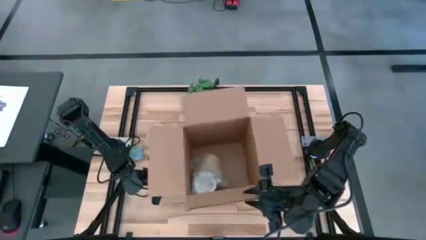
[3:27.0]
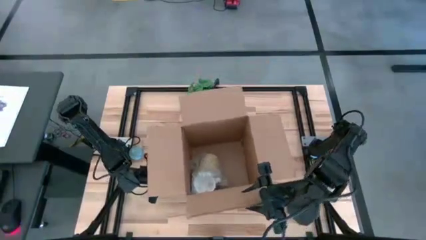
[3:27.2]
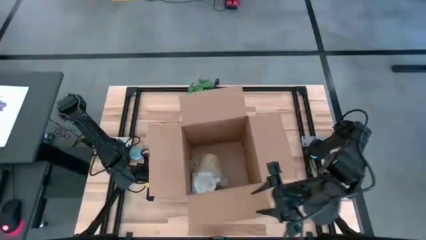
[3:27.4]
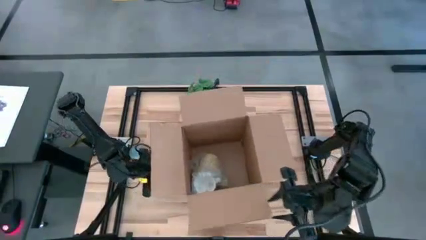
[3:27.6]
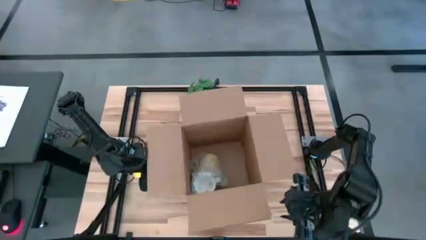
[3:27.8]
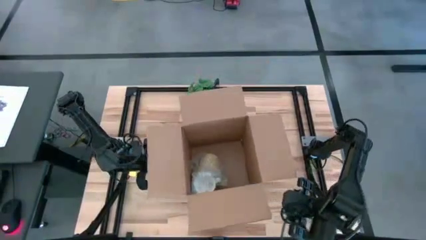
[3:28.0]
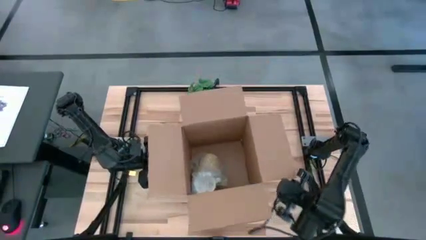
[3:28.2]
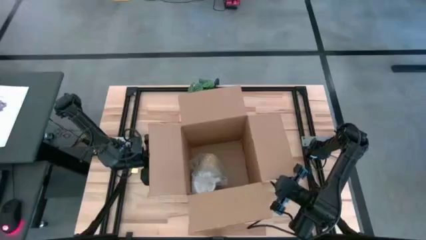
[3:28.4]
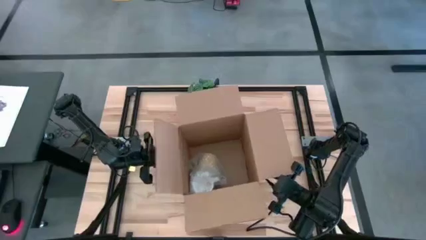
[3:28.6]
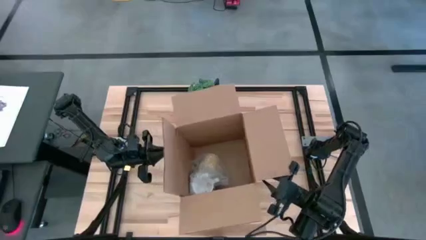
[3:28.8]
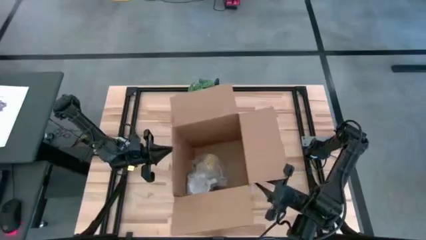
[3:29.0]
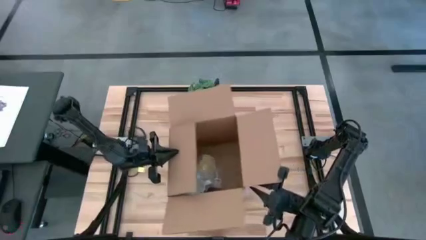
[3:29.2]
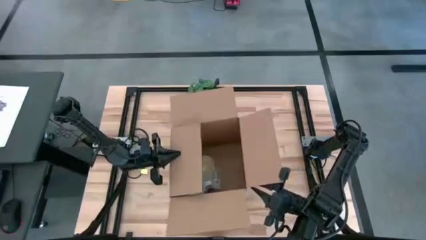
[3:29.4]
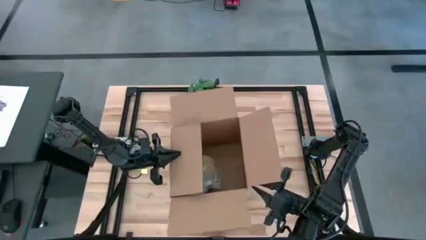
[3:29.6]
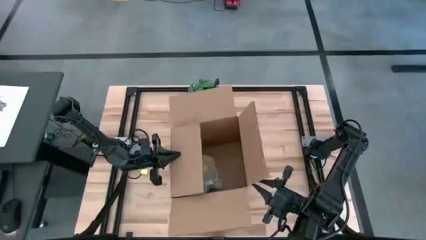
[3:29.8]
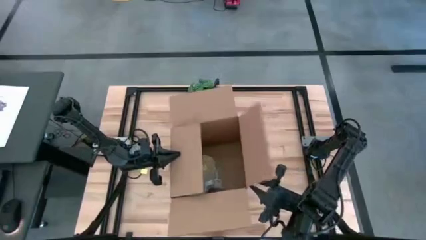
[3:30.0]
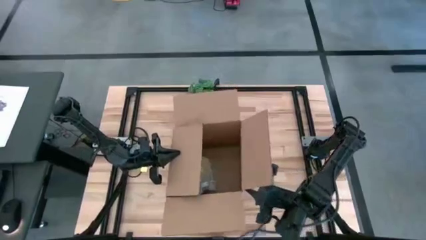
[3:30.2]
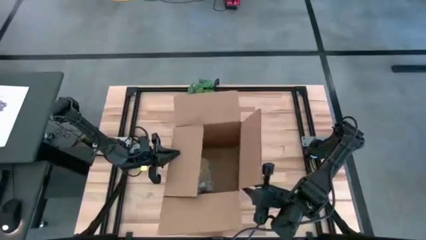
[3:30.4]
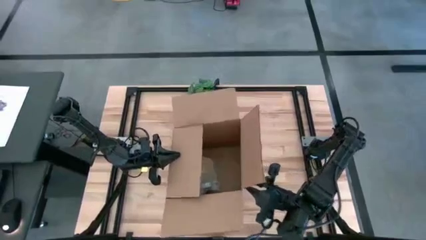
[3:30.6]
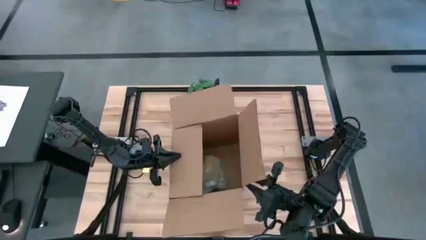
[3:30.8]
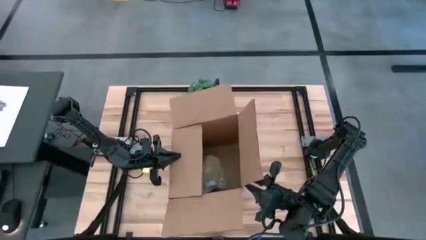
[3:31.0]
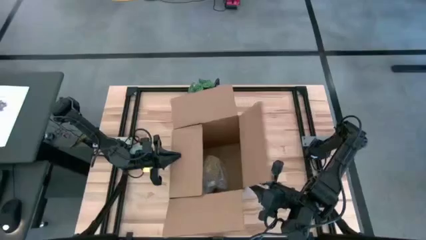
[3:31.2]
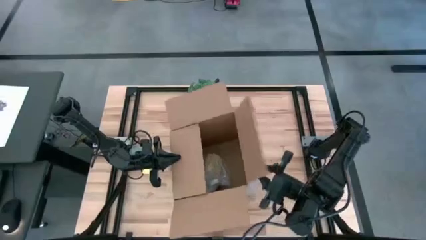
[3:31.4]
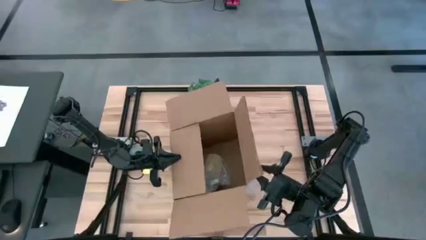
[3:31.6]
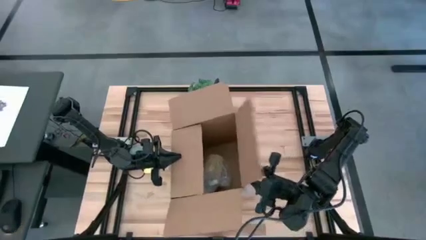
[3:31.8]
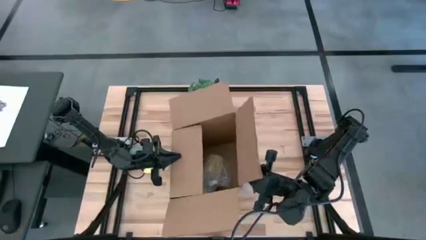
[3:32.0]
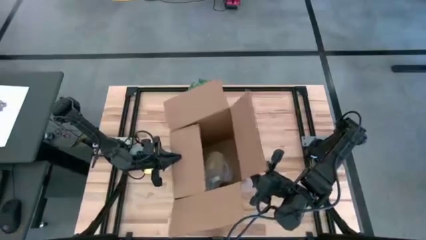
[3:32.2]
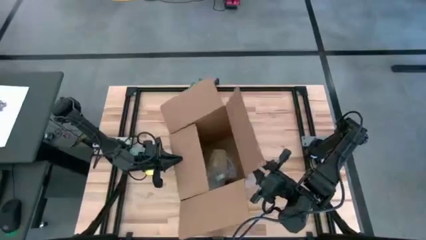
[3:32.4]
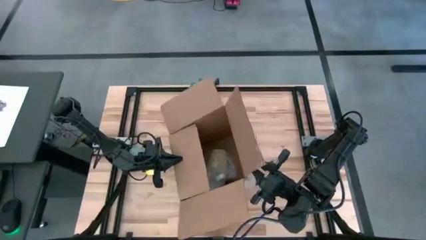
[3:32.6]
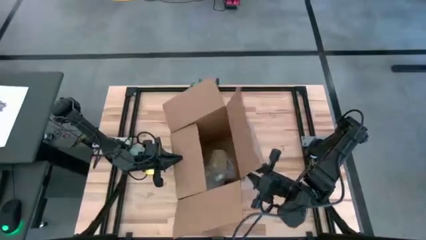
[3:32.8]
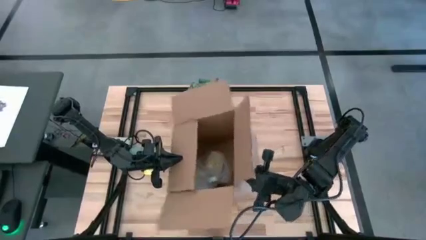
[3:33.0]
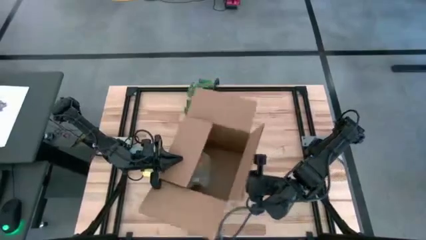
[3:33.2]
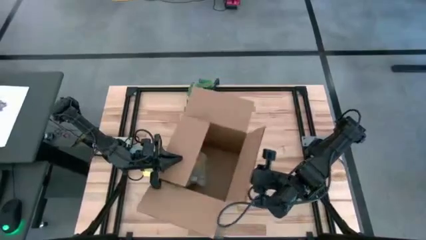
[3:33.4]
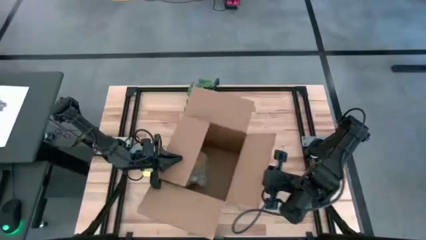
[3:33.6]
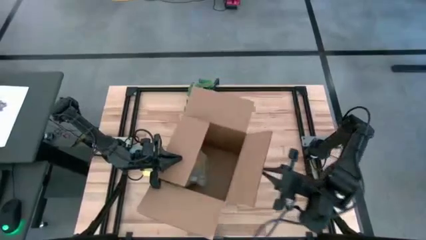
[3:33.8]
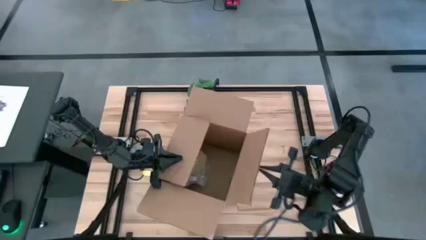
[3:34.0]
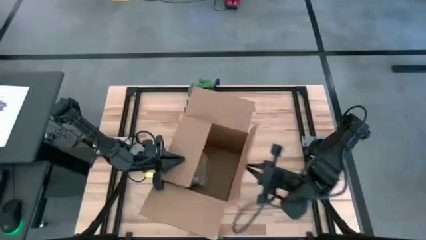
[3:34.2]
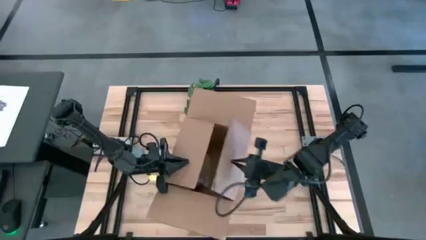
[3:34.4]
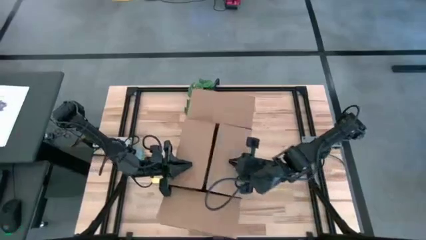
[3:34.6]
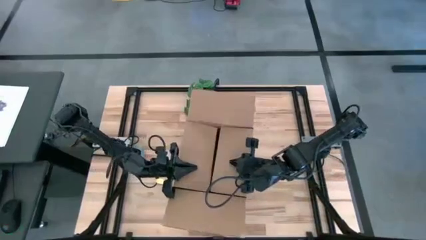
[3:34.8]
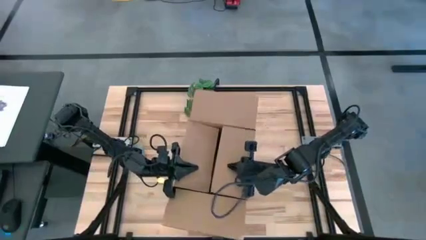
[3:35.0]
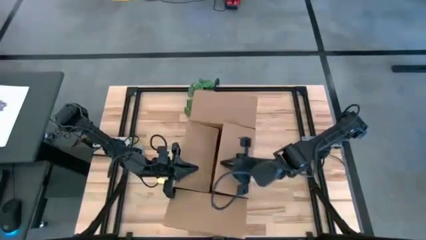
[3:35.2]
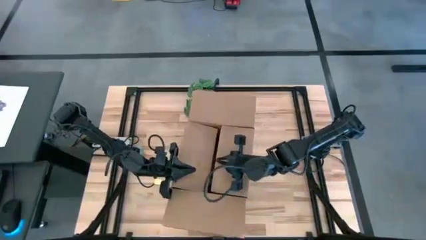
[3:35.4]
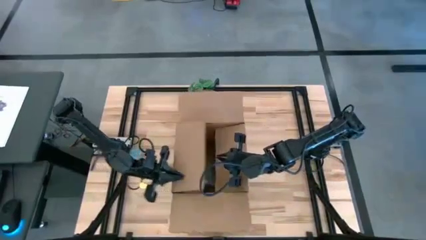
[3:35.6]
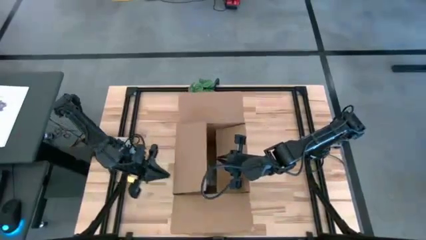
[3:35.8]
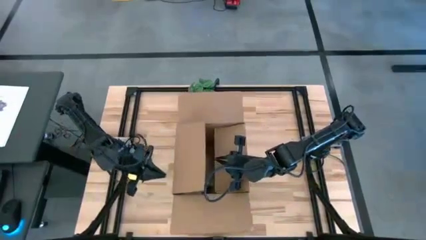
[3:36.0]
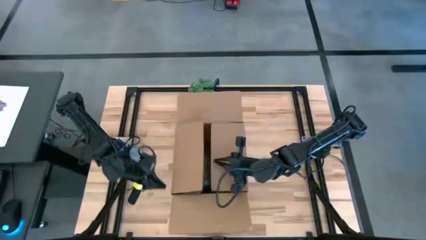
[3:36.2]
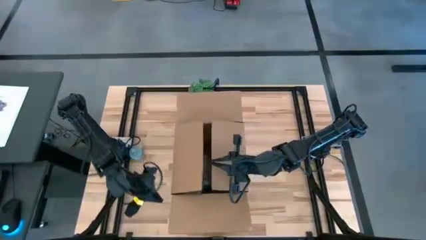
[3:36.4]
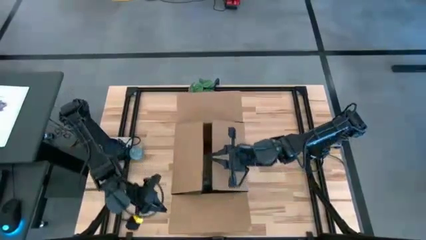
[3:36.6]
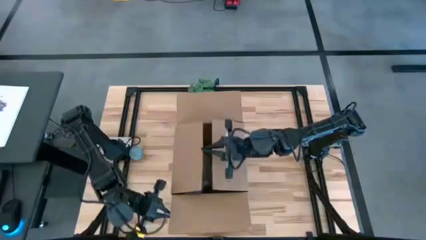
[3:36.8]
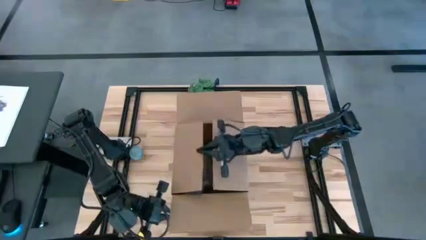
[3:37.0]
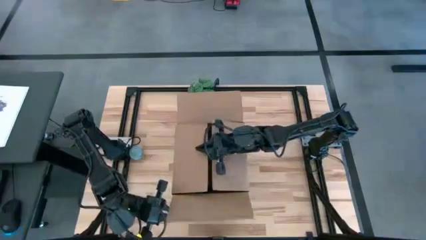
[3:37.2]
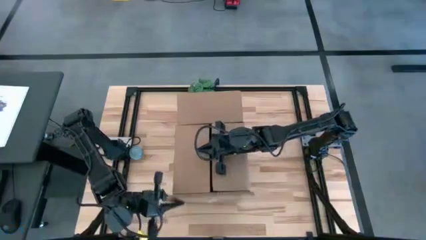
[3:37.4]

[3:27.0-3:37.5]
Task: wrap mug
Close the cardboard box

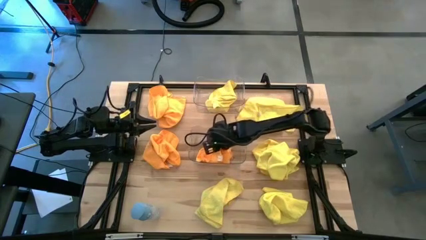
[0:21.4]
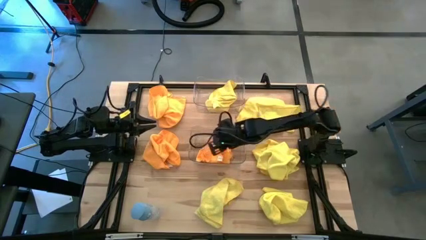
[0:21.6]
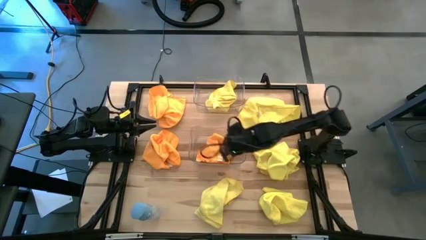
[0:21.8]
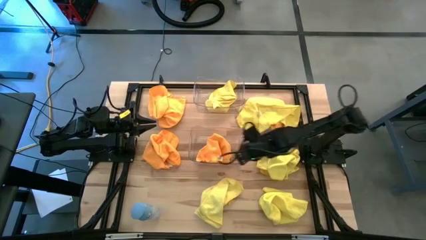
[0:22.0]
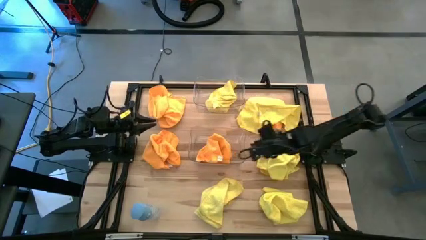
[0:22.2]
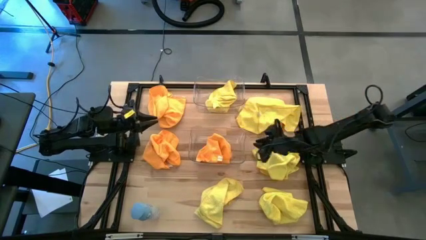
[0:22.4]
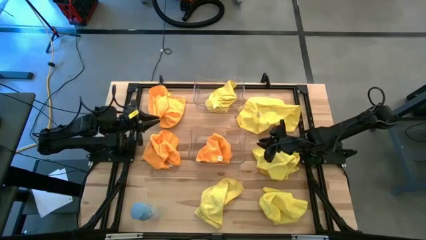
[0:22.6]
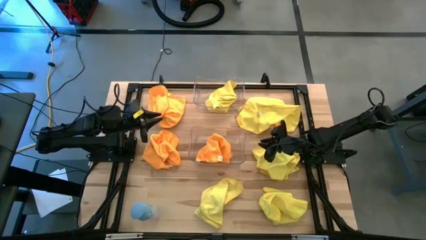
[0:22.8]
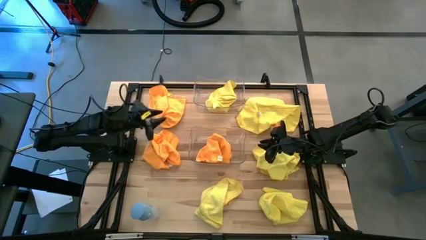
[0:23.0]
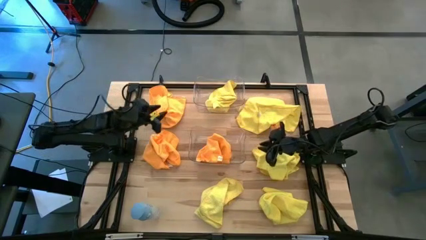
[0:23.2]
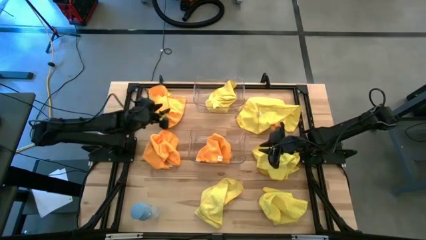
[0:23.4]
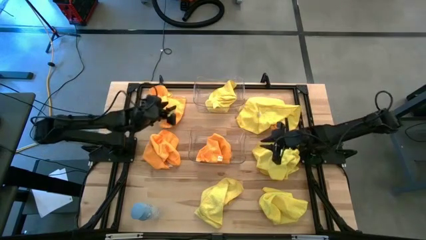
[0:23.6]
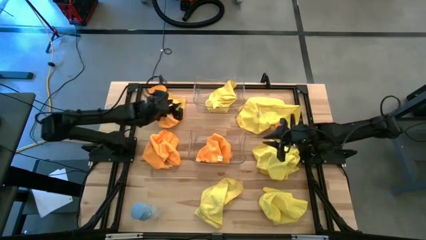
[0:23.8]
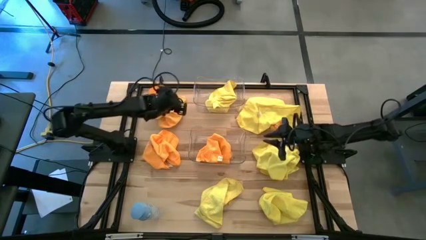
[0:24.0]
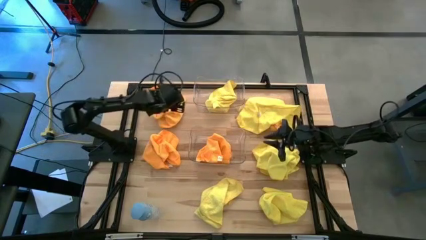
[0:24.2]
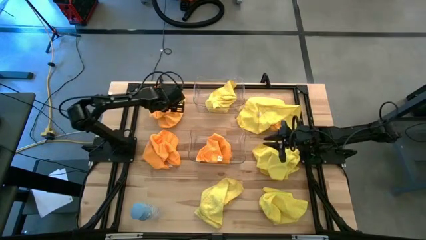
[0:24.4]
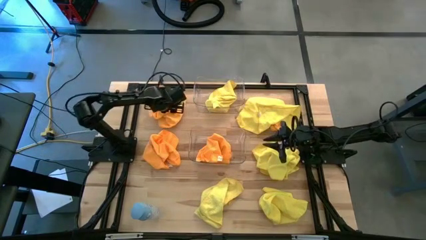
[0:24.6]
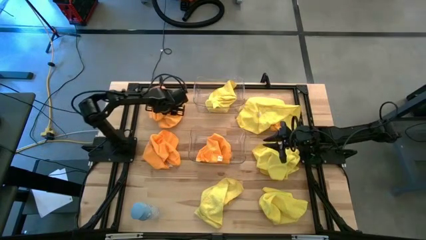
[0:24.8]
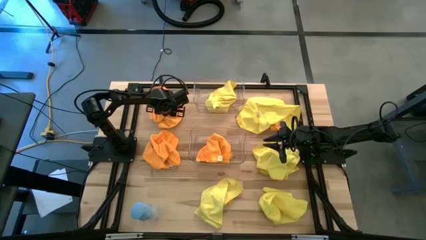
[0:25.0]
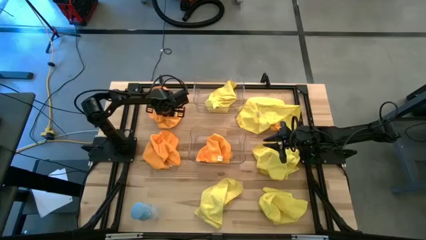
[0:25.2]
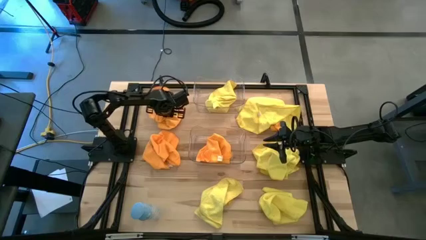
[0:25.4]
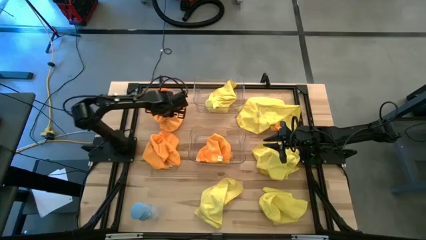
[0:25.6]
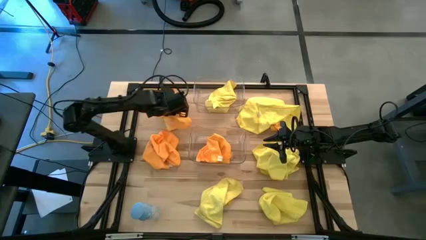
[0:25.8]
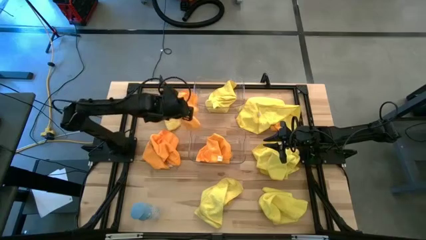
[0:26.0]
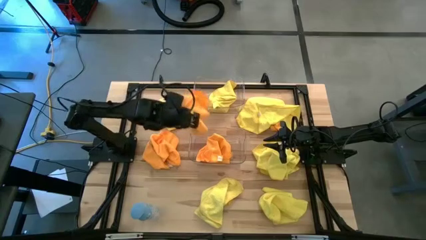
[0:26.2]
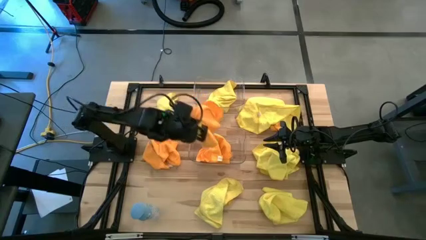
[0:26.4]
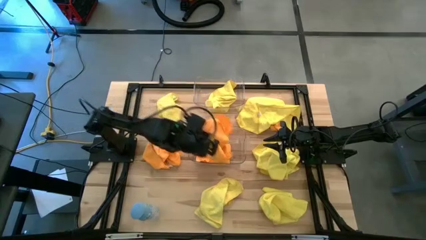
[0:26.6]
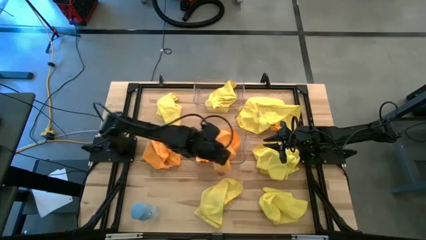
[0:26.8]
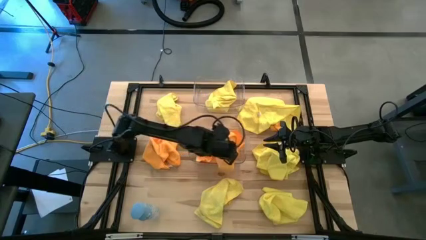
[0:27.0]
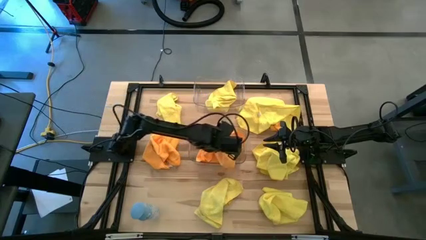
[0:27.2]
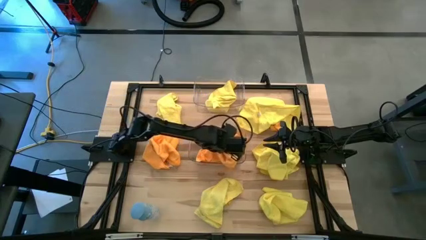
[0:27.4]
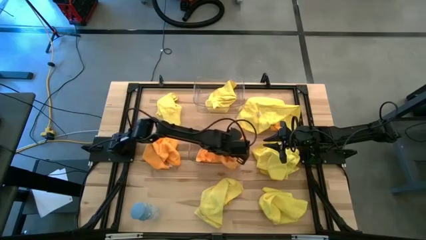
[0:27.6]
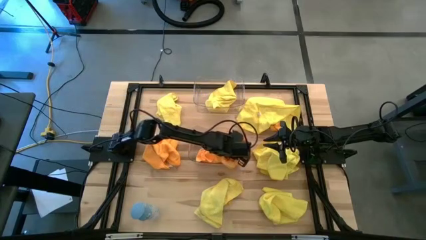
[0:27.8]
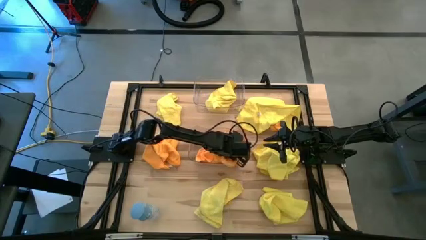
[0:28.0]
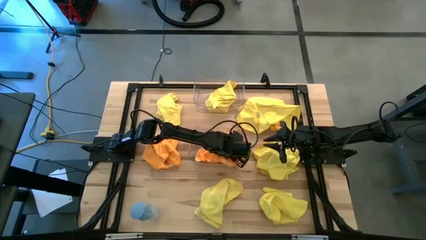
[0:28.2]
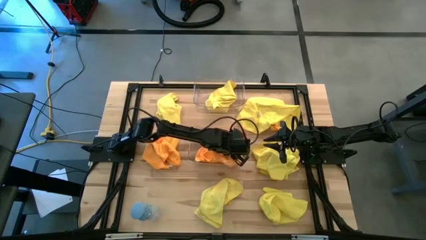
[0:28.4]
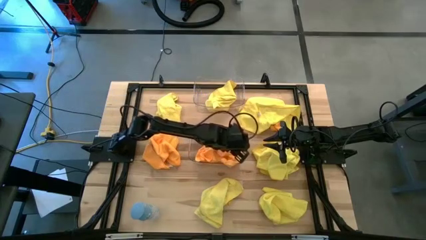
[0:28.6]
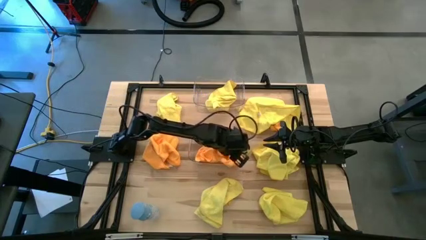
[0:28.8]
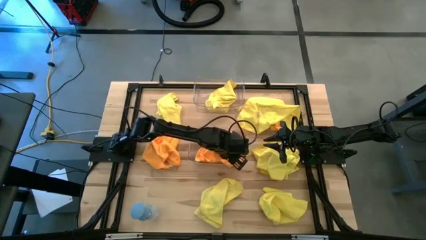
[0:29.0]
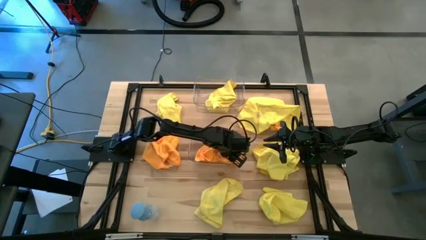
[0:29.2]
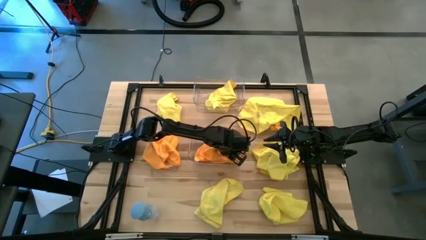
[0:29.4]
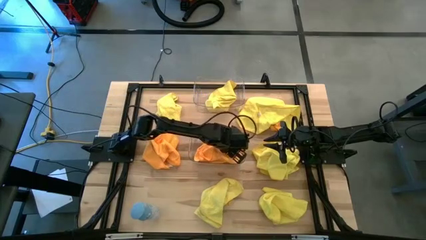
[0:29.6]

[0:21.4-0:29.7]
Task: Sort microfiber towel by color & place in baskets
Put the orange microfiber towel into the bottom transparent bin
